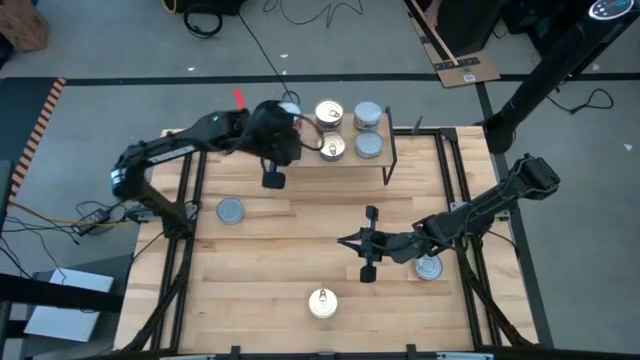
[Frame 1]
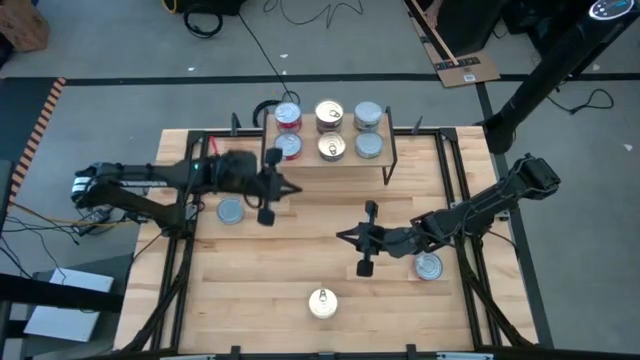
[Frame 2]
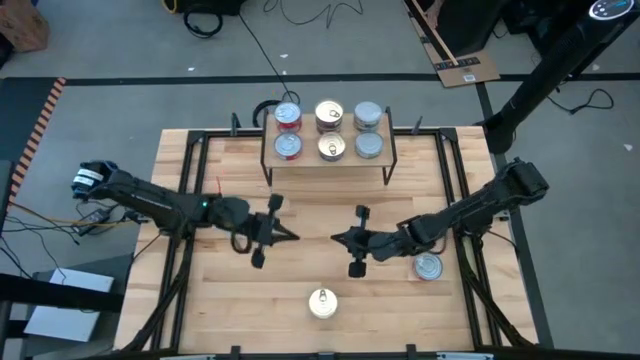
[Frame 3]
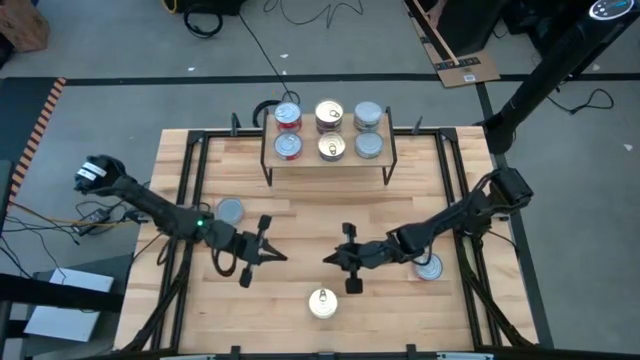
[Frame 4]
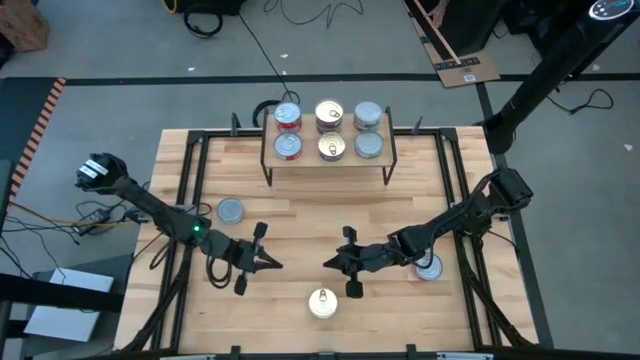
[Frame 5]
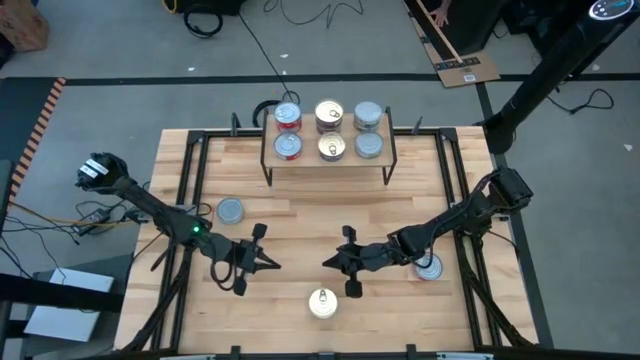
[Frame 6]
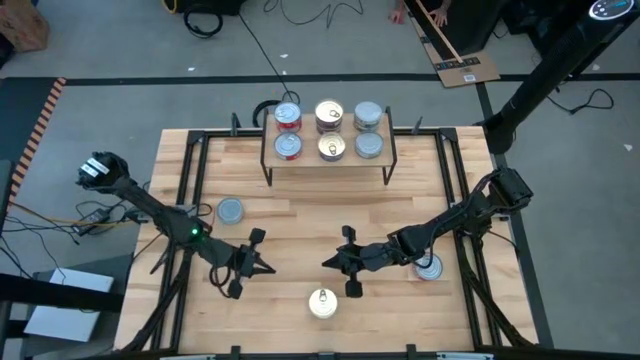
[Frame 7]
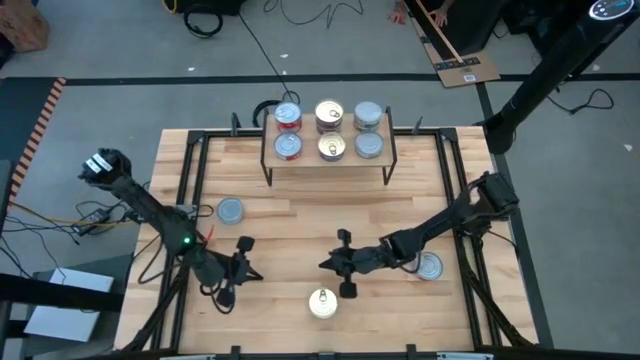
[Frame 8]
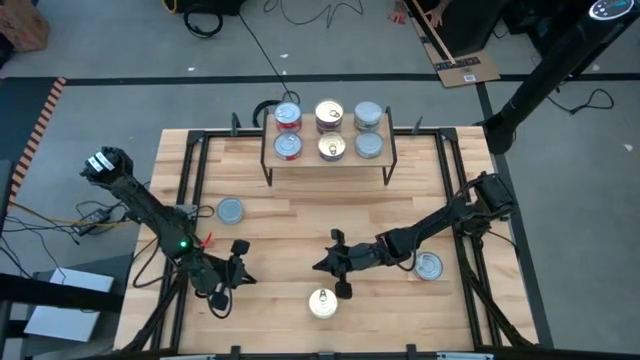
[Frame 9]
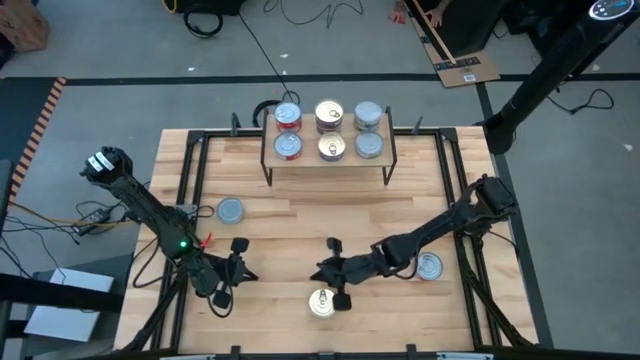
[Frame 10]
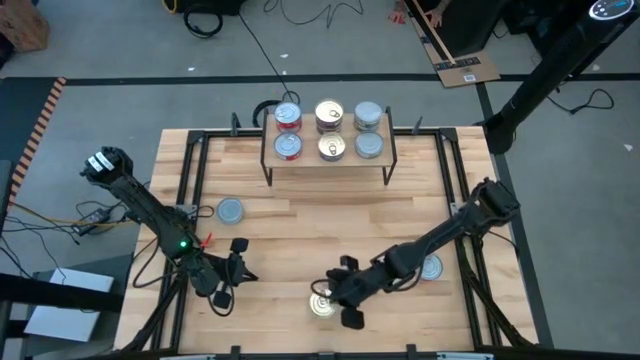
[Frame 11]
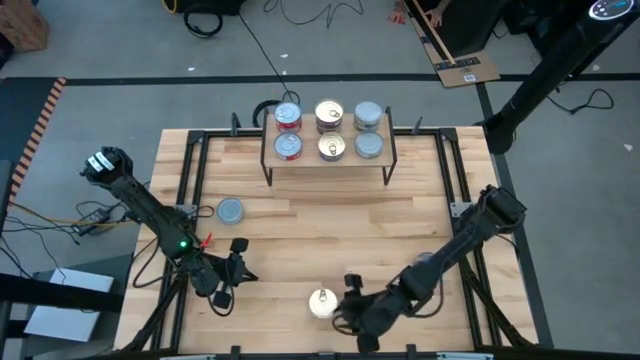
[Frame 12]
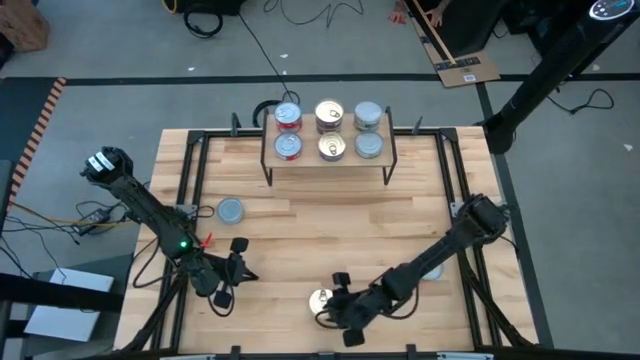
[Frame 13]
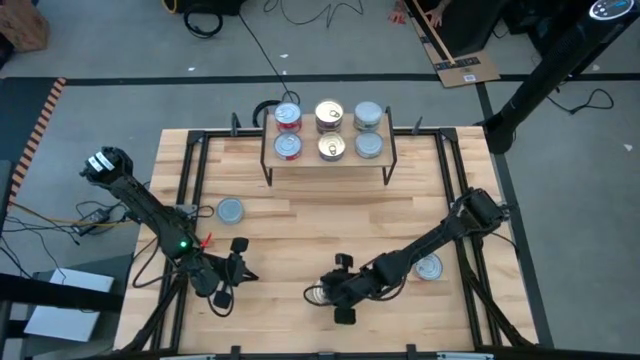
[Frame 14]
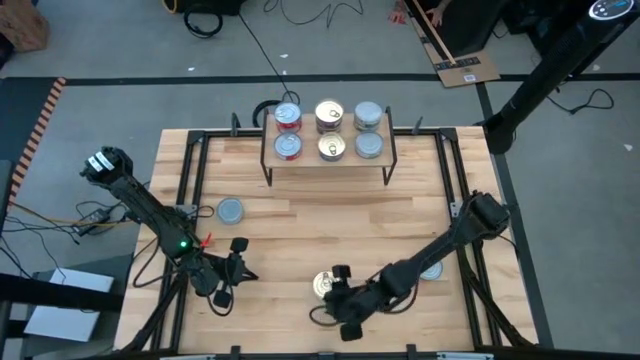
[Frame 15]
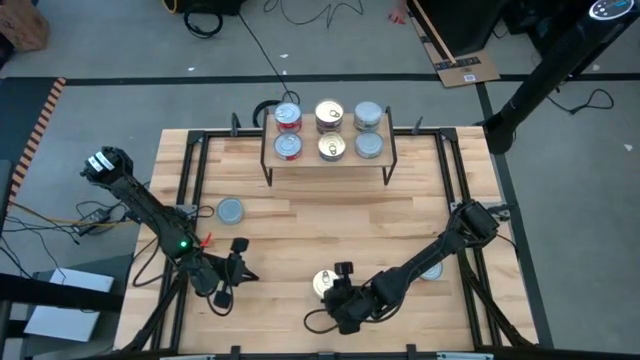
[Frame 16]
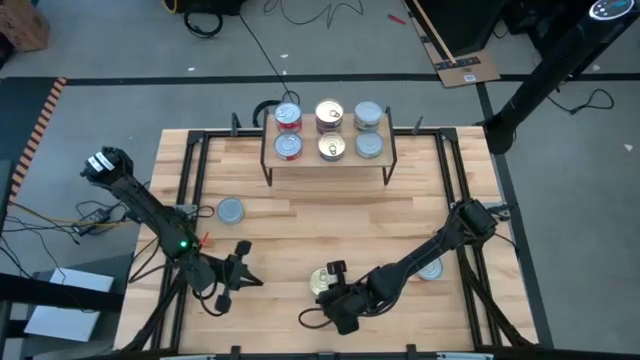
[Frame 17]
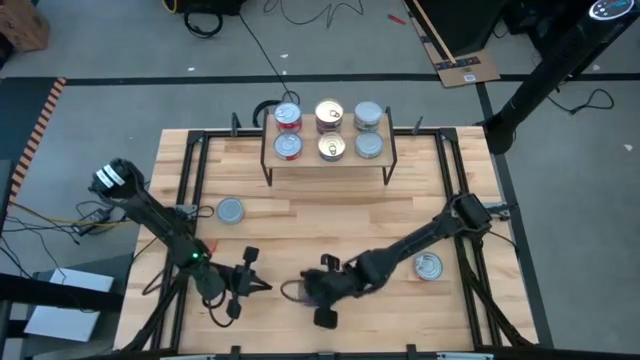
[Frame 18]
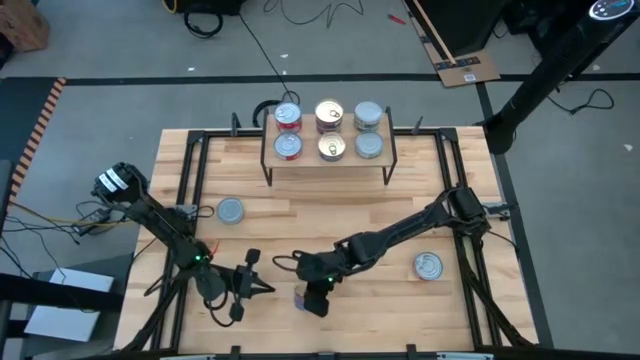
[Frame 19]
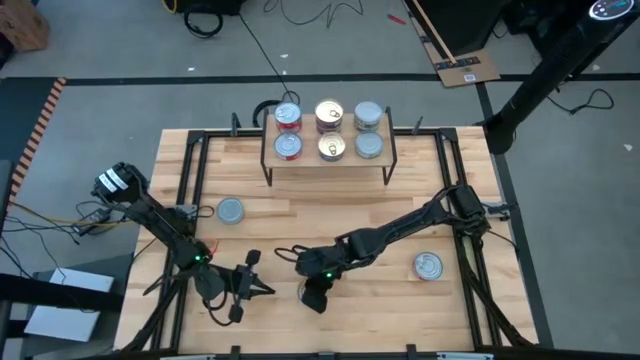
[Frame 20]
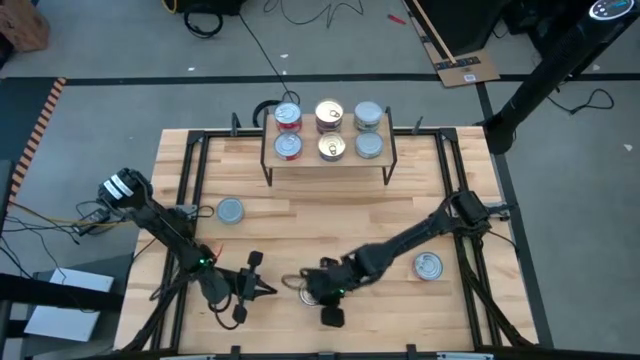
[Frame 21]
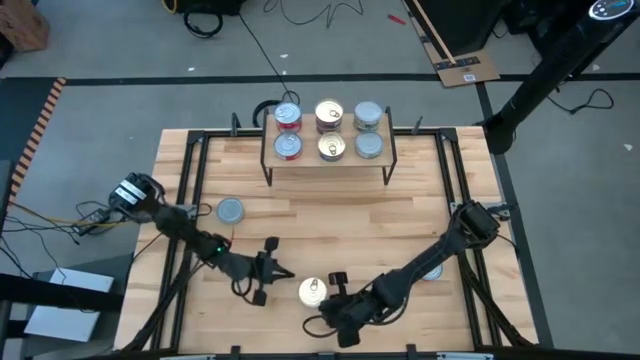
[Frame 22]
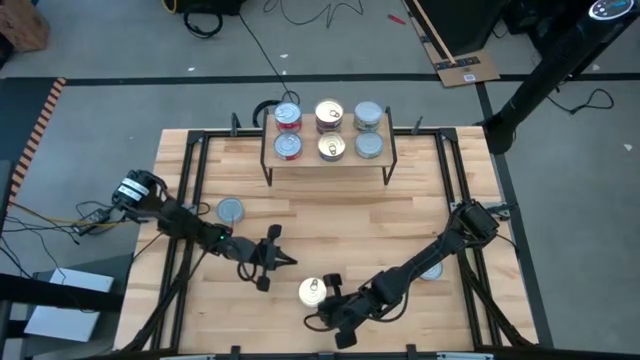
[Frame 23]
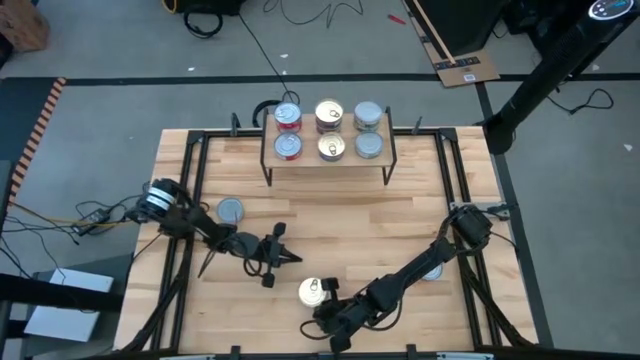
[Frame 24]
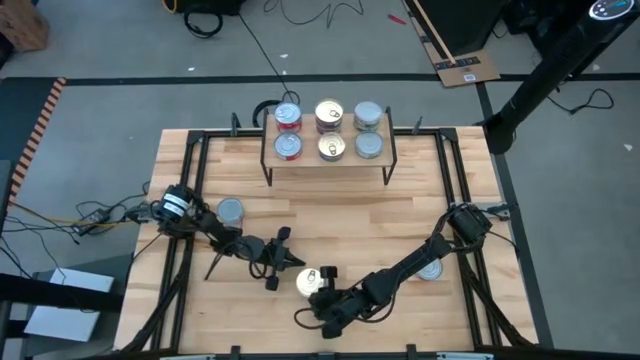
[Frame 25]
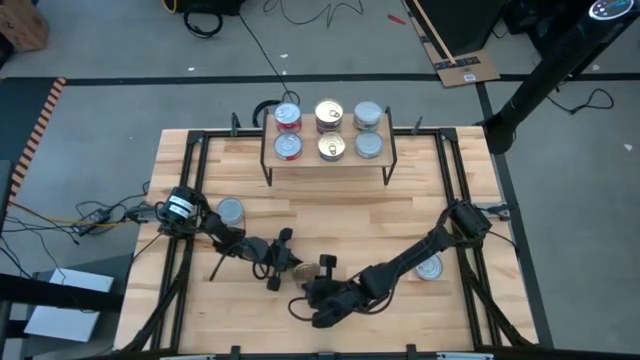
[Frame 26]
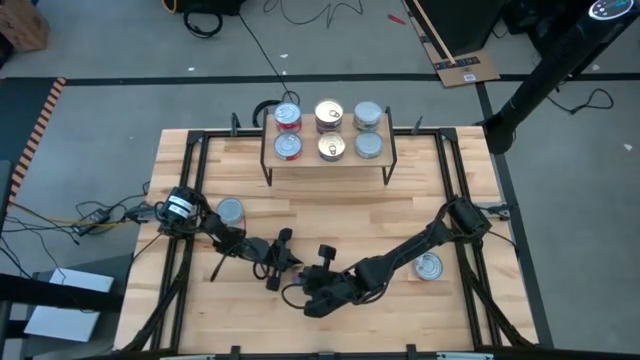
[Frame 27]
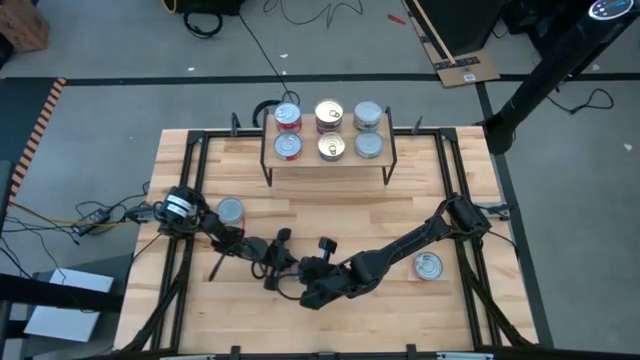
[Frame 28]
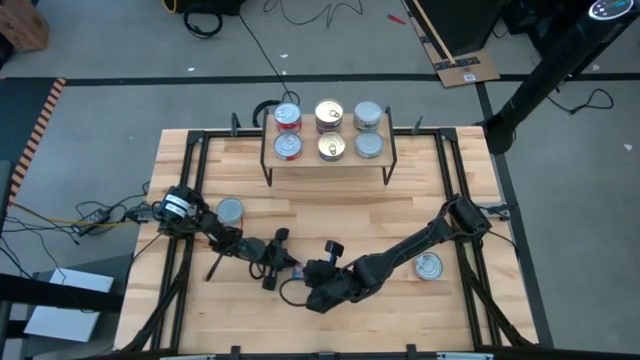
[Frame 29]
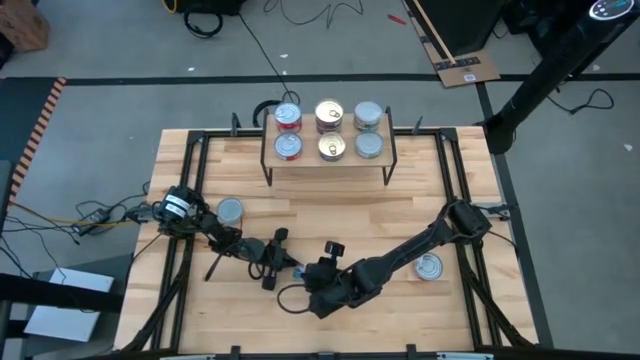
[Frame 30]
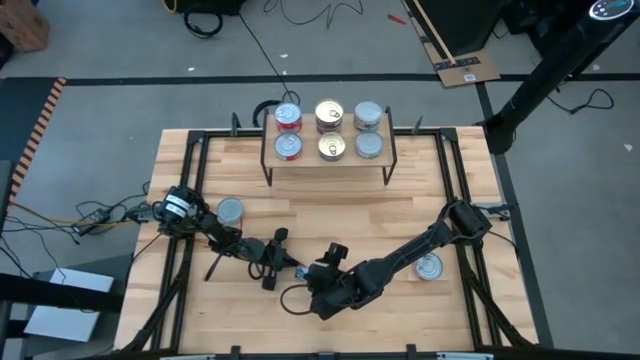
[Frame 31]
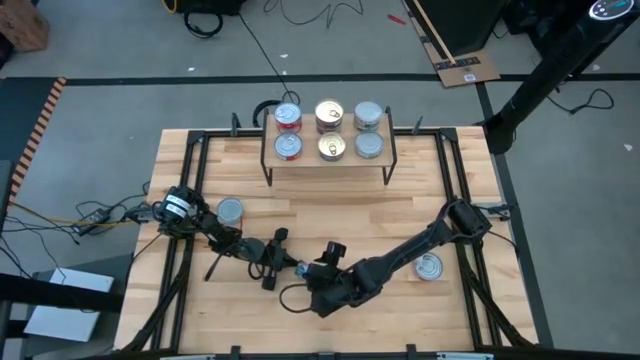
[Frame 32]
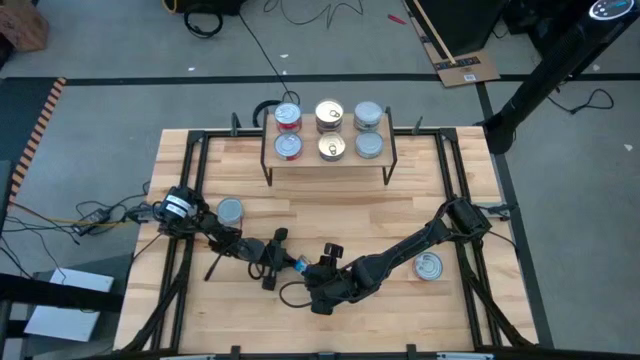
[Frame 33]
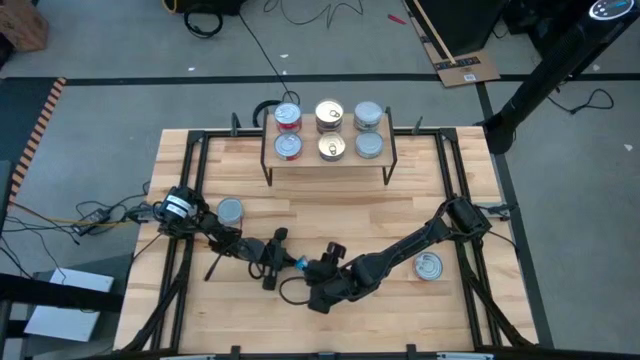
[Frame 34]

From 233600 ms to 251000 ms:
Task: Stack canned seafood by type on shelf
Stack the blue pink tuna can on top of the blue pink tuna can on the shelf

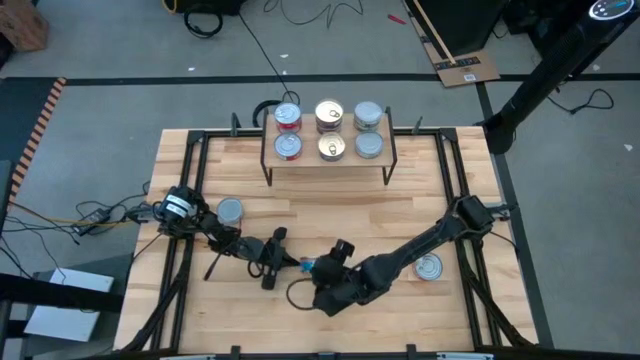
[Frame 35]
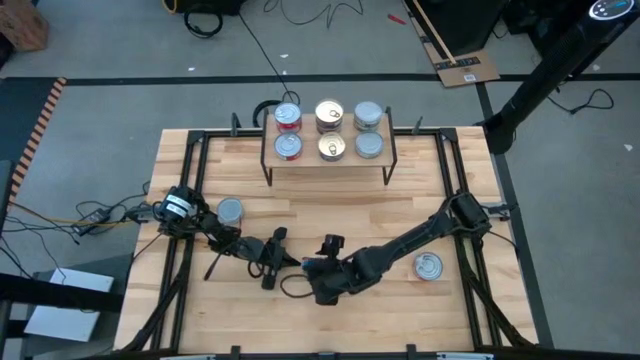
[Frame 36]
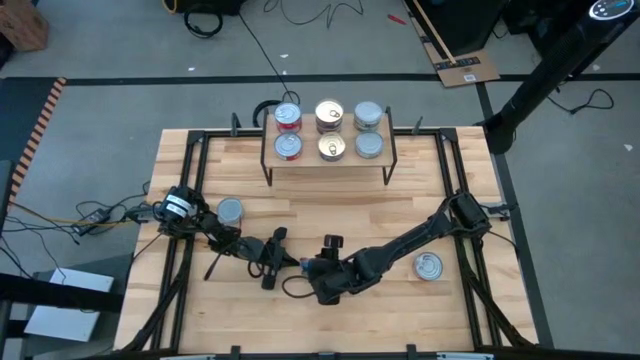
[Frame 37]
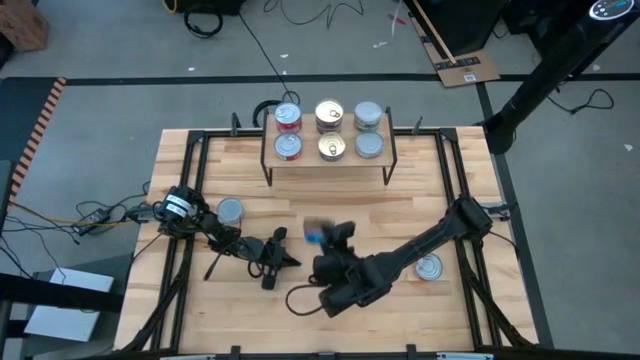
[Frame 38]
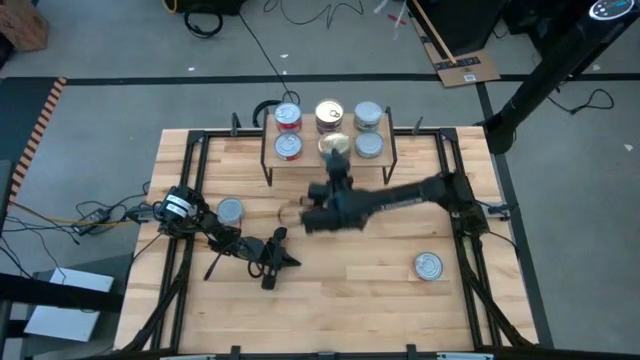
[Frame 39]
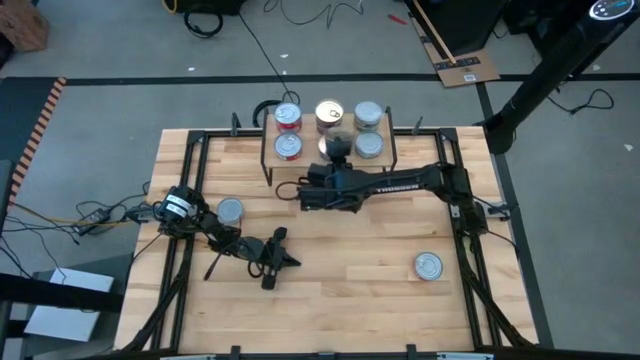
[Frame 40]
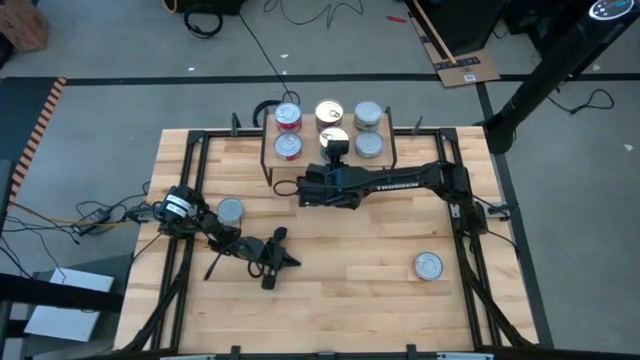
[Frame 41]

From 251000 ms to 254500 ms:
Stack the blue pink tuna can on top of the blue pink tuna can on the shelf
